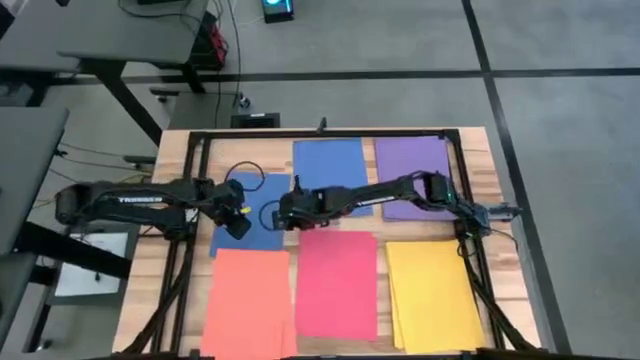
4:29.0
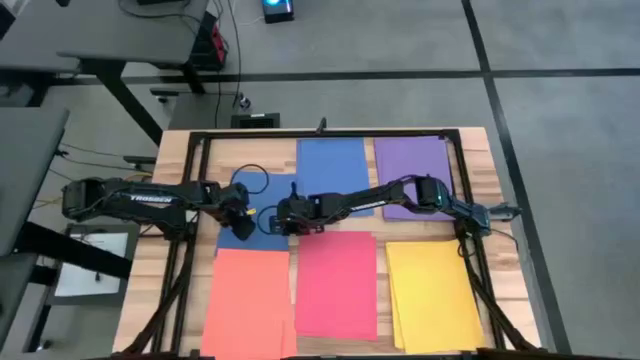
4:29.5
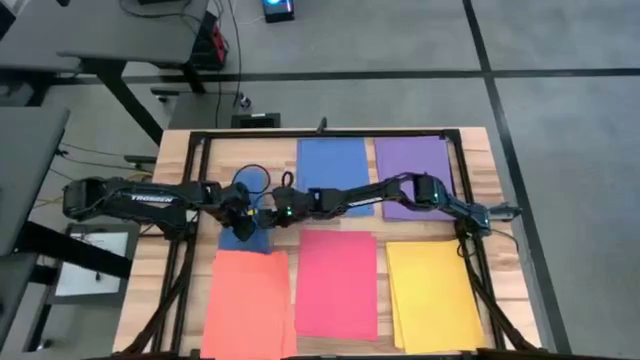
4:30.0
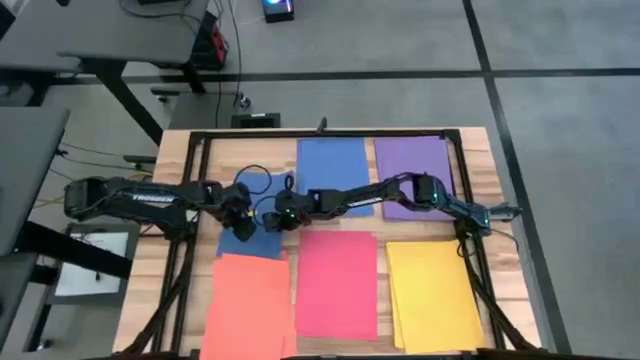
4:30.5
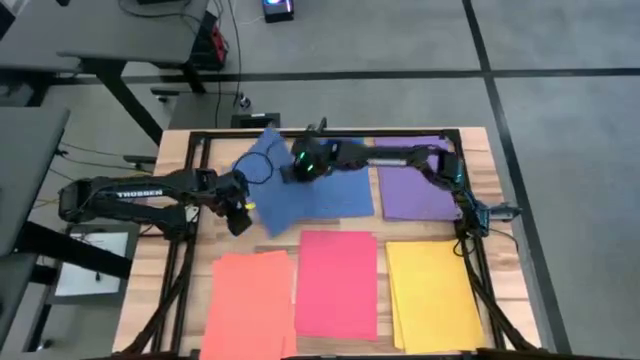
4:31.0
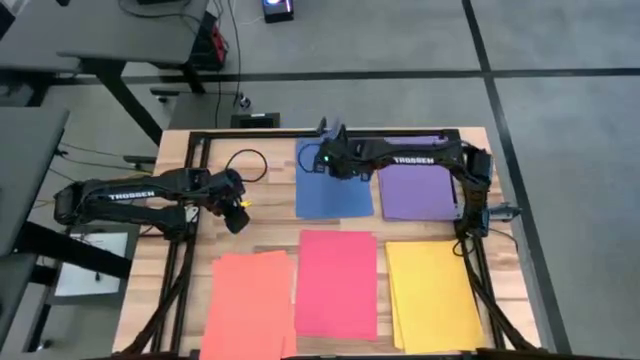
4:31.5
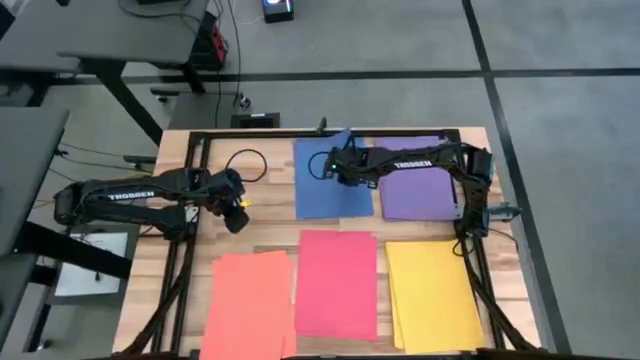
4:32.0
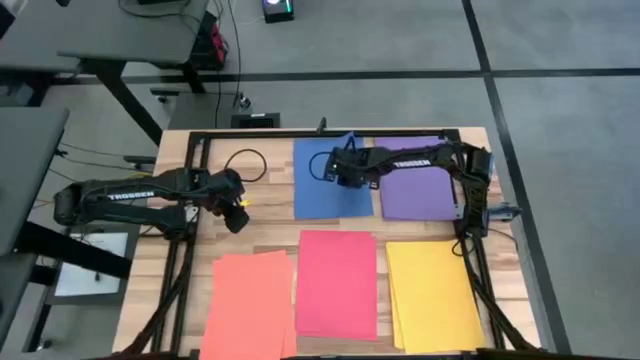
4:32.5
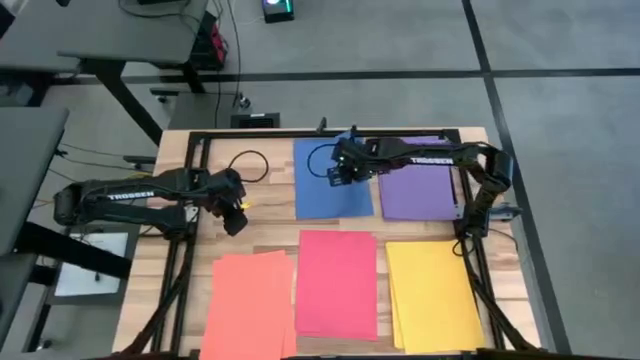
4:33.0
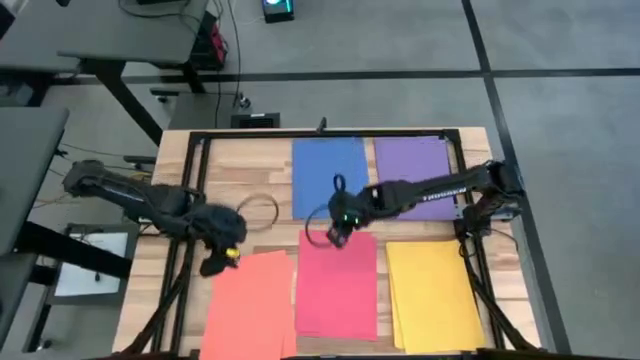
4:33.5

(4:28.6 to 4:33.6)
Task: Organize paper
Stack the blue paper on the top center blue papers

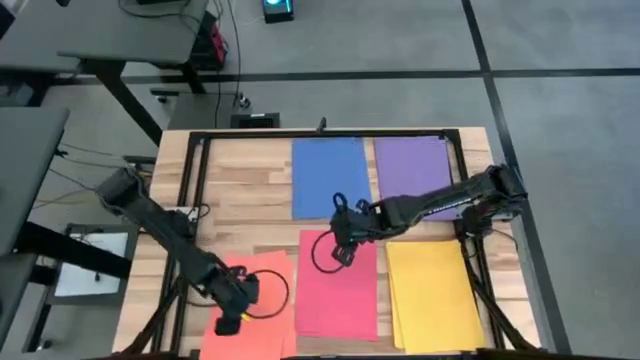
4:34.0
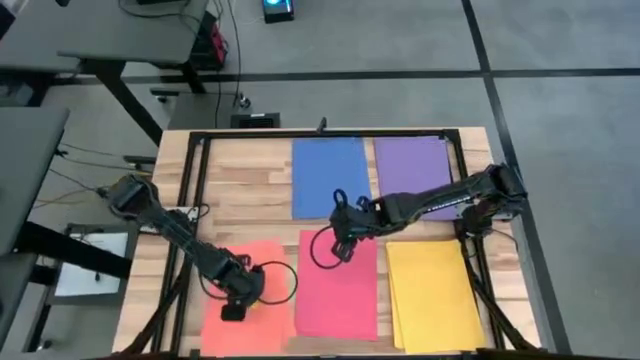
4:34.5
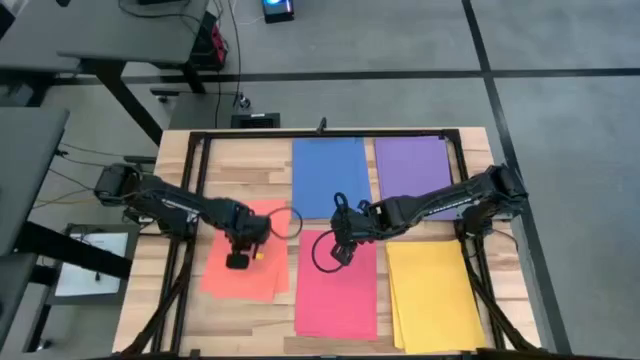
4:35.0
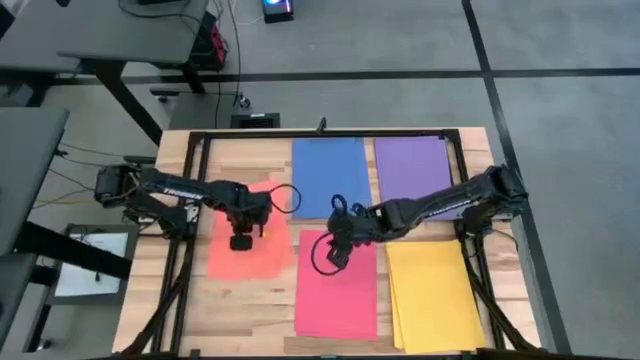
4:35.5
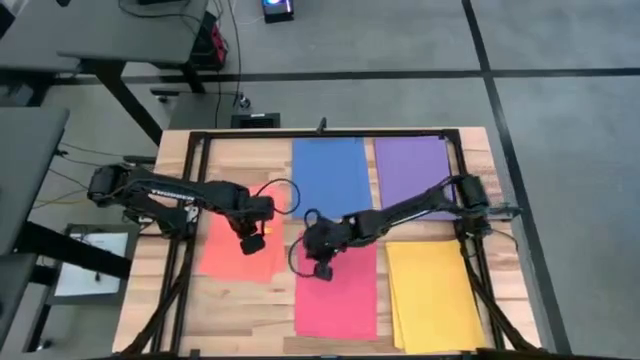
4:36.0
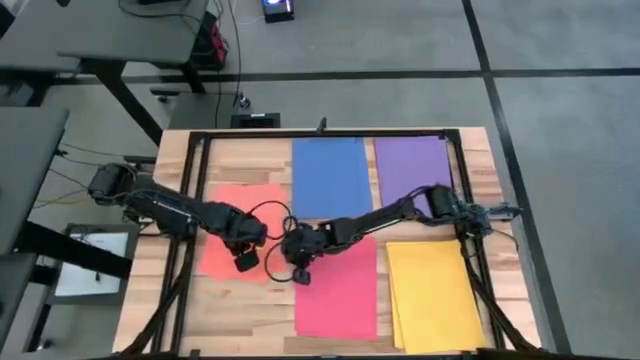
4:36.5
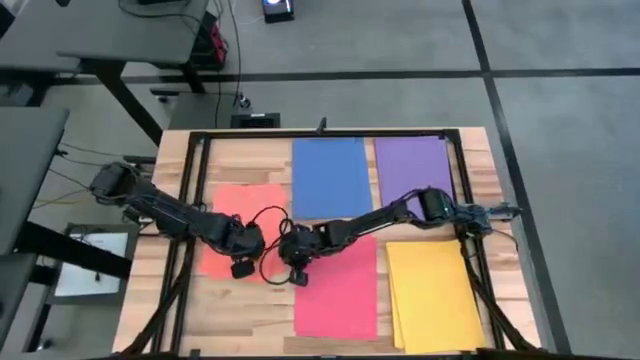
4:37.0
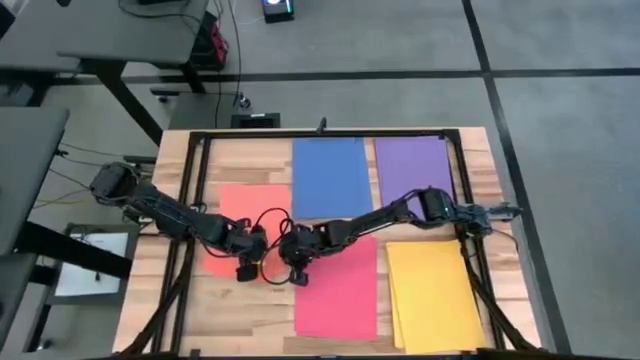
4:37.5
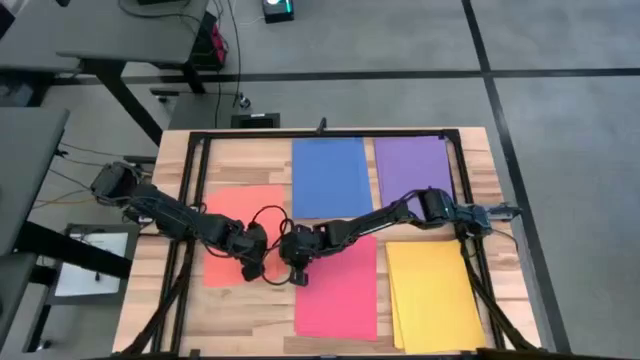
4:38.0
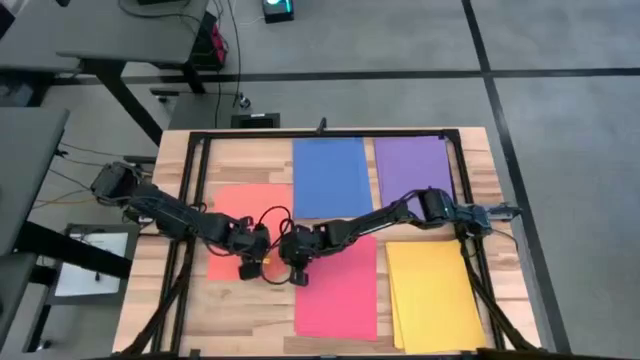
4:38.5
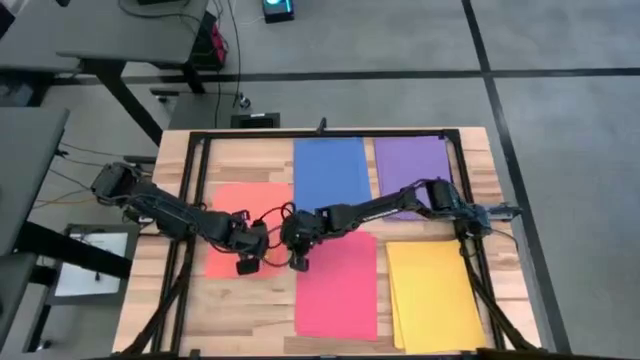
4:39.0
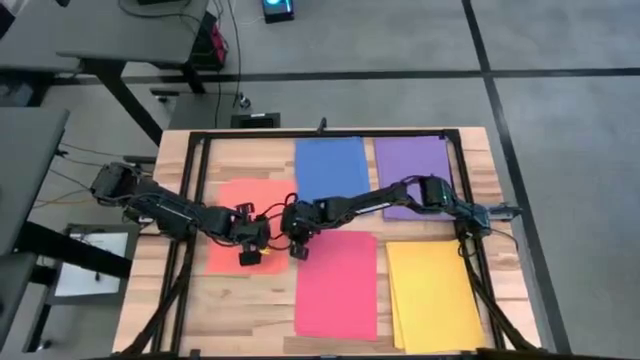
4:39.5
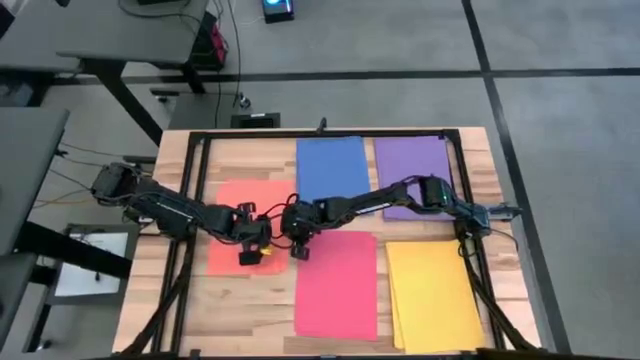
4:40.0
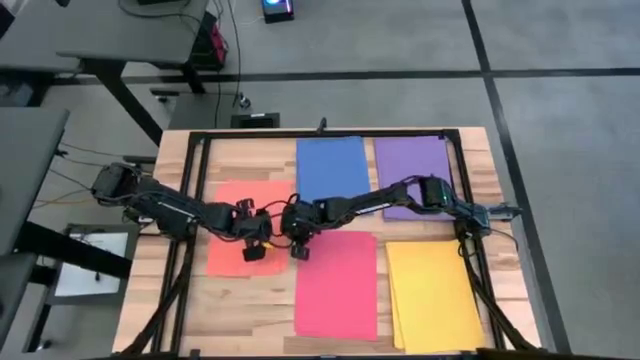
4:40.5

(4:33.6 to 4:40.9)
Move the light orange papers to the middle left of the table

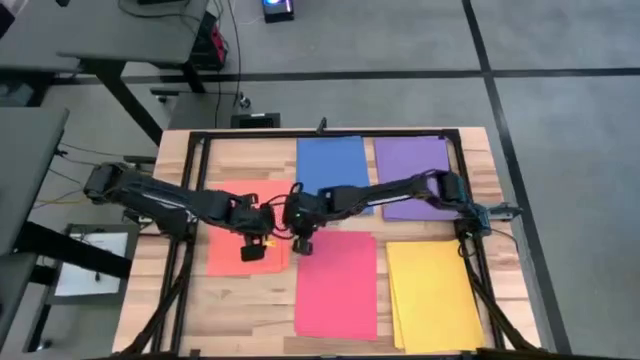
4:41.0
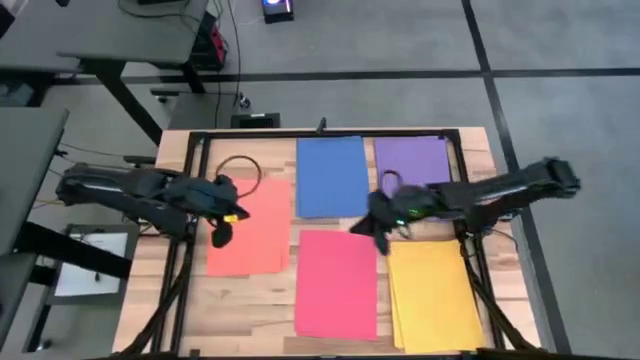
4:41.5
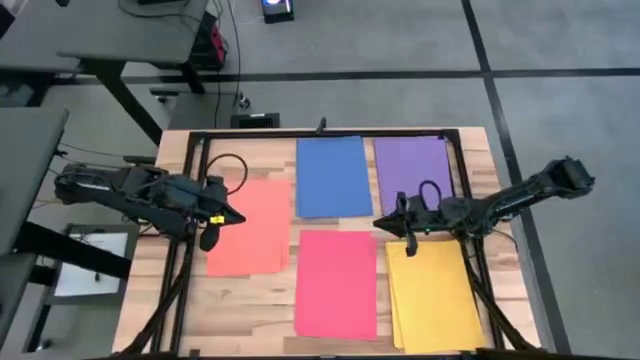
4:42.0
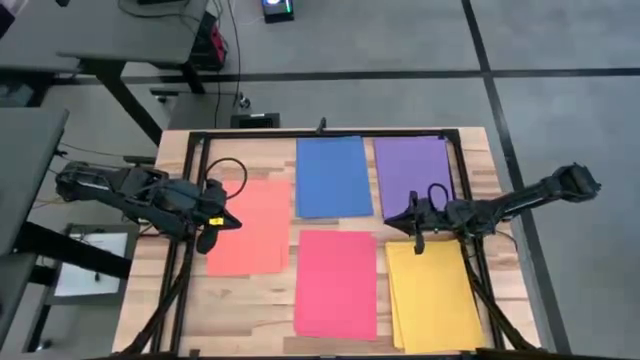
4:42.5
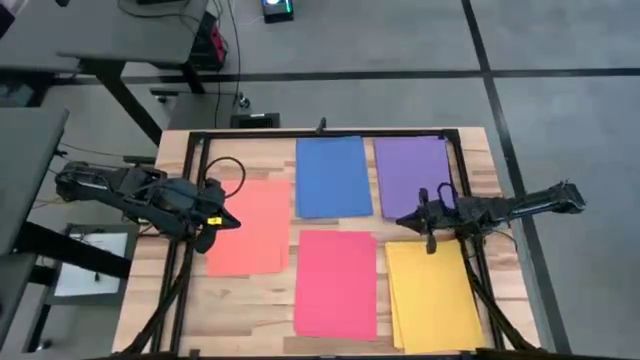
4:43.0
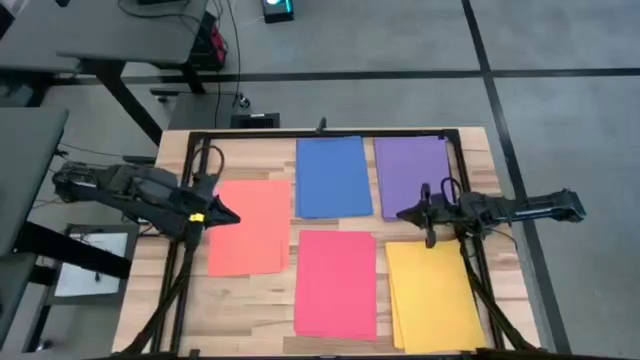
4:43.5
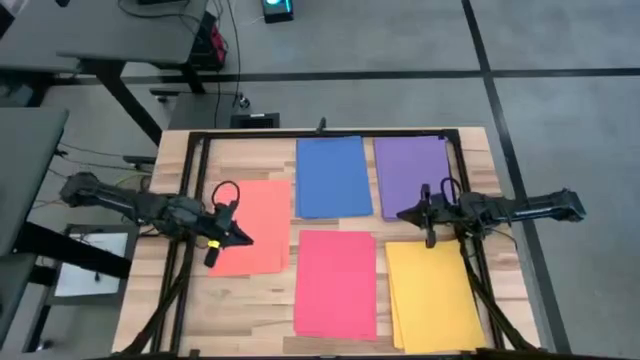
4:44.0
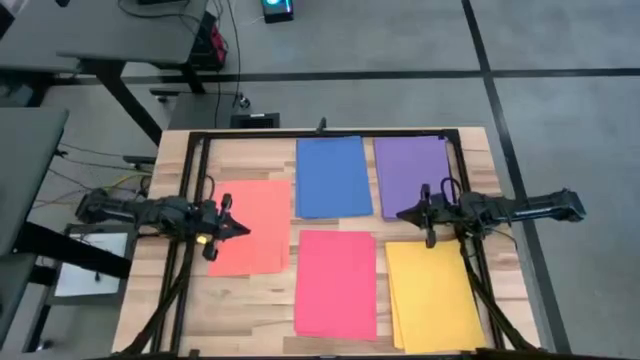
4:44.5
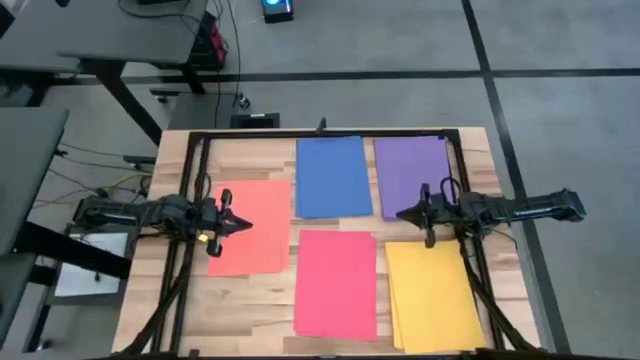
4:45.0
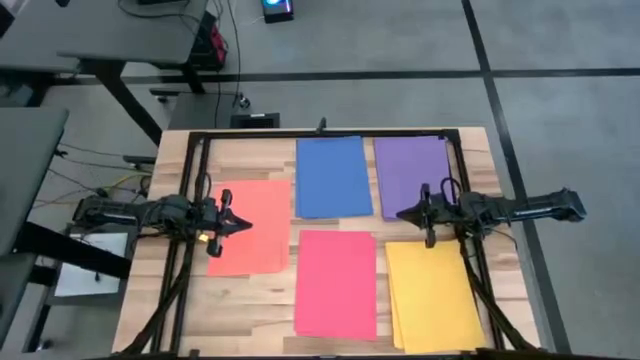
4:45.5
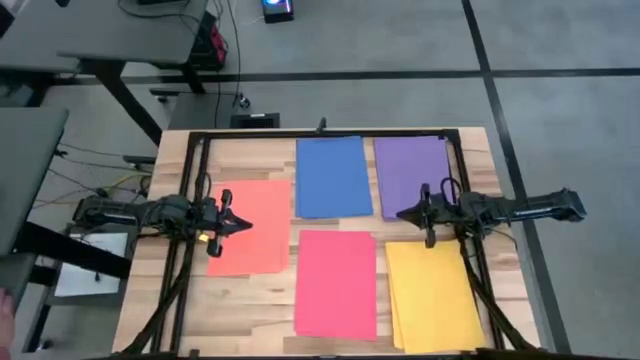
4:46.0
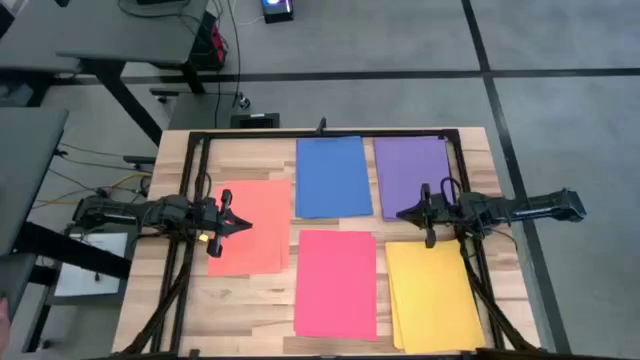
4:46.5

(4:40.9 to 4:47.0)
Return to Home Position

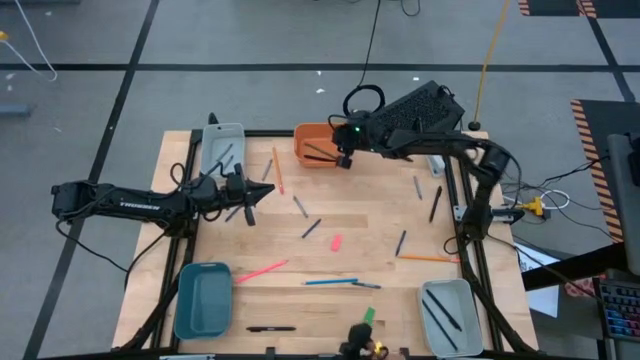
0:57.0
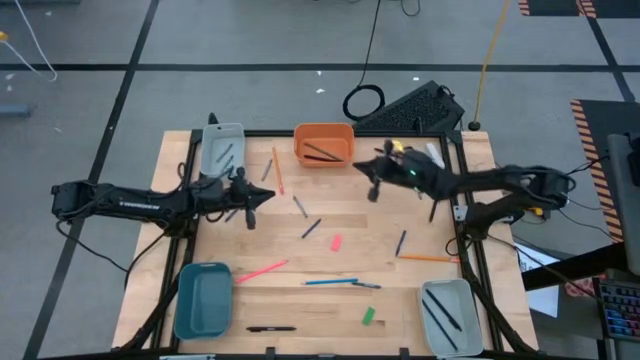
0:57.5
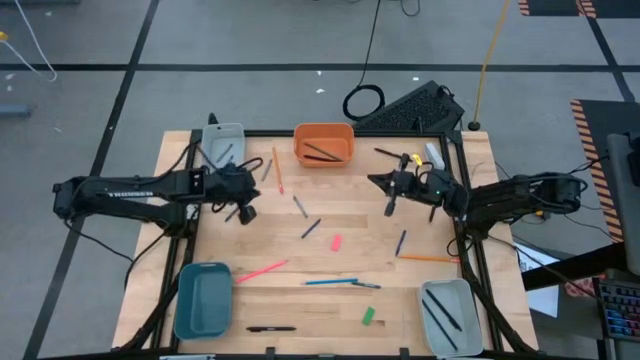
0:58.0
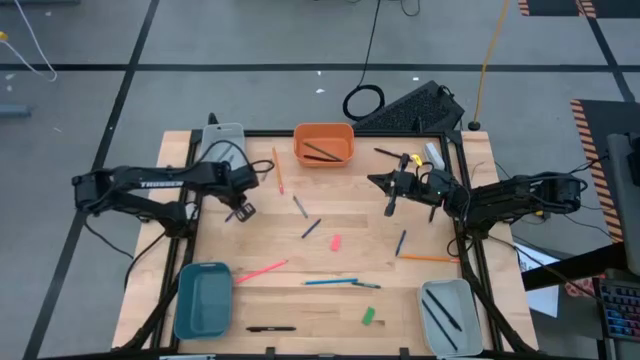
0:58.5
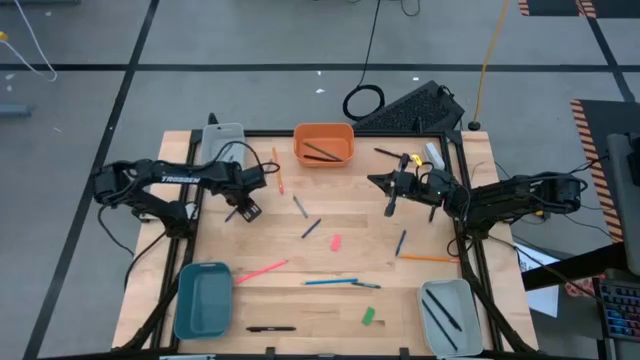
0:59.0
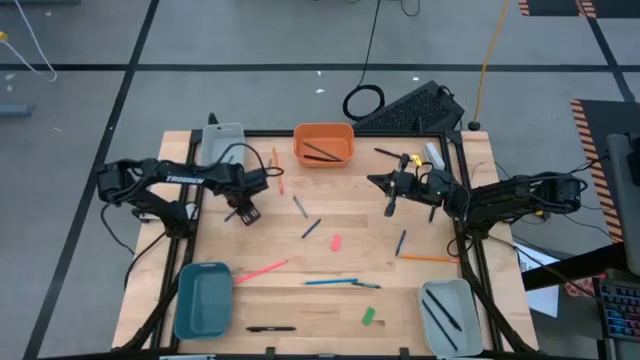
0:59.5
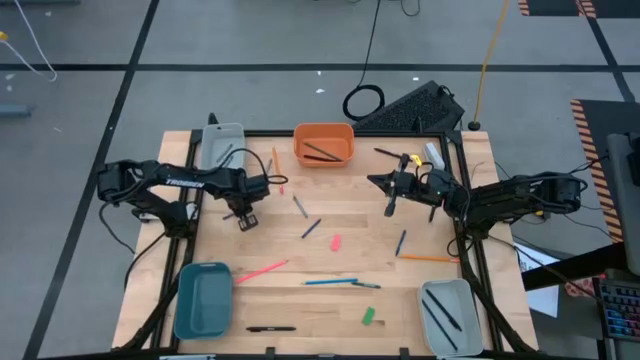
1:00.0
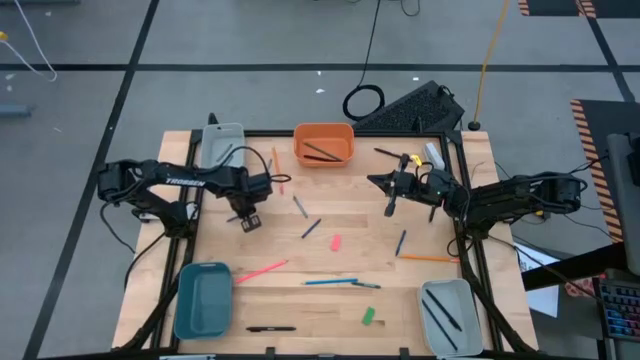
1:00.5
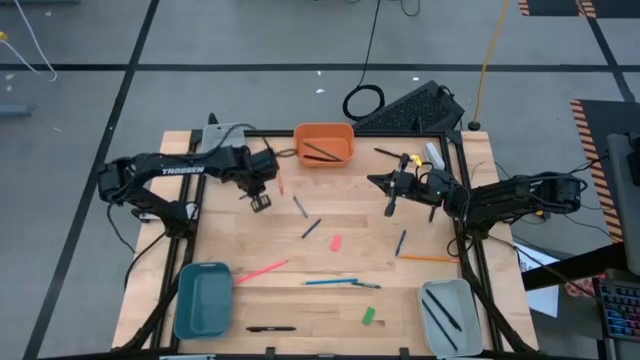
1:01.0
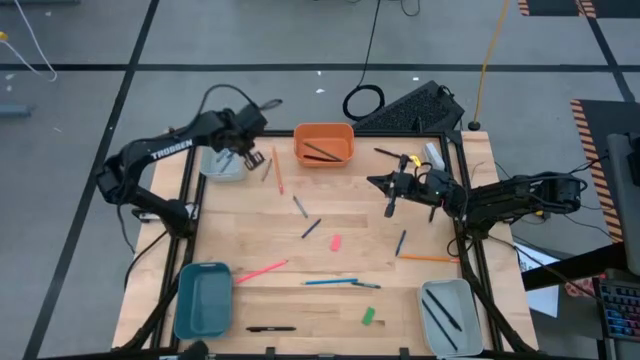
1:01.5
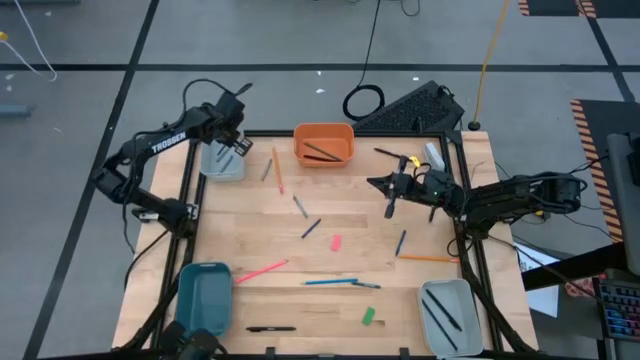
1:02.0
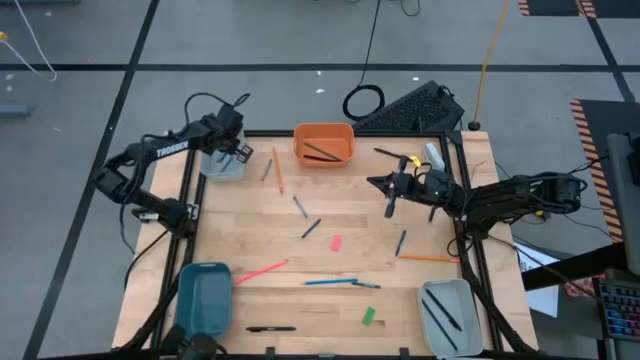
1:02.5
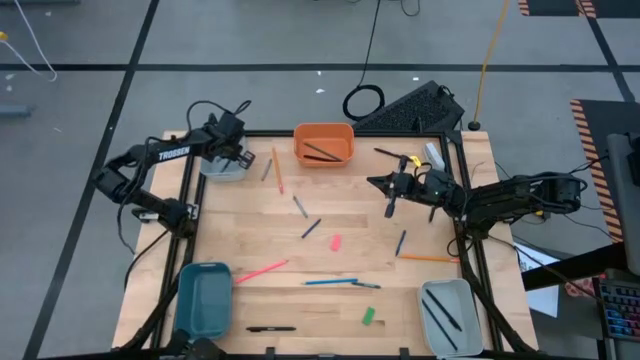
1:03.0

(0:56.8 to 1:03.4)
Task: Sort crayons/erasers/pens/pencils in bins
Put the blue crayon into the top gray bin
